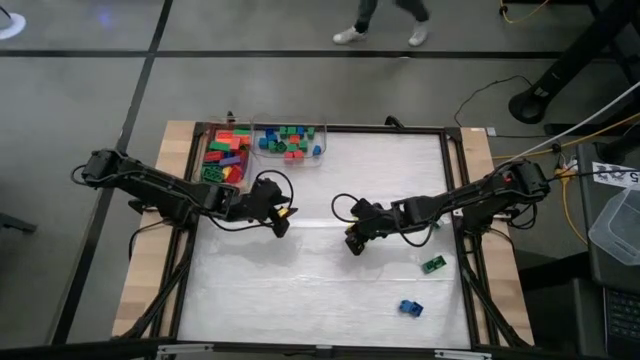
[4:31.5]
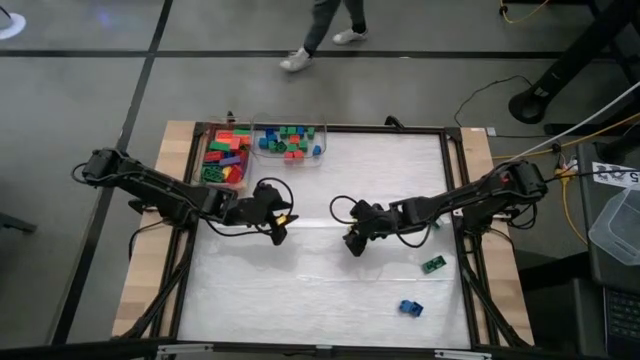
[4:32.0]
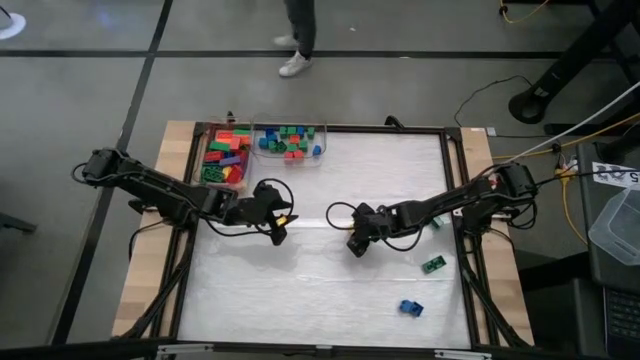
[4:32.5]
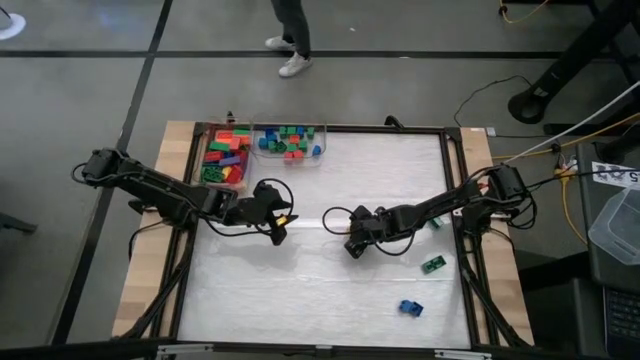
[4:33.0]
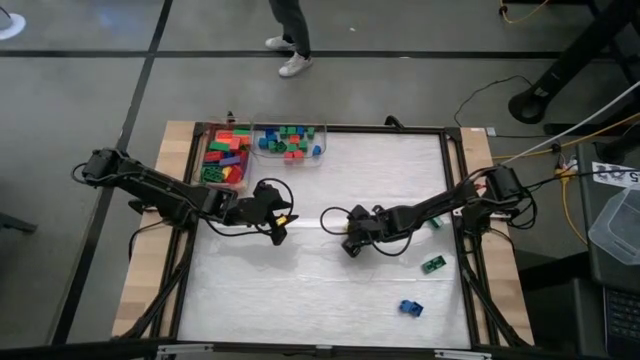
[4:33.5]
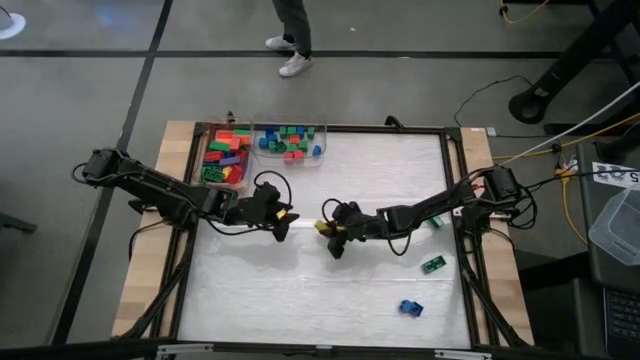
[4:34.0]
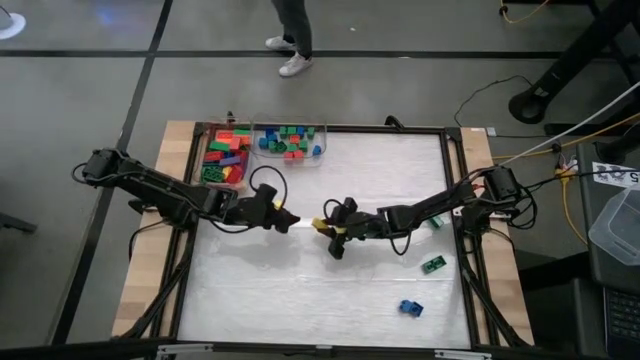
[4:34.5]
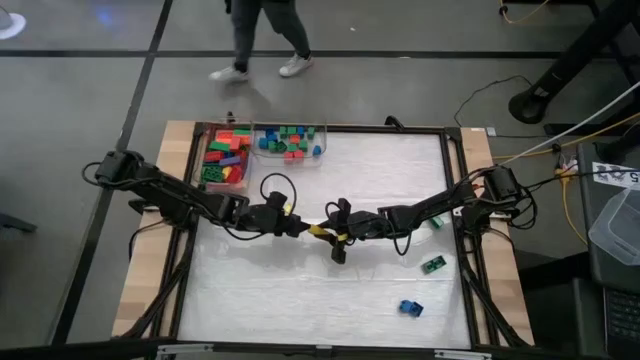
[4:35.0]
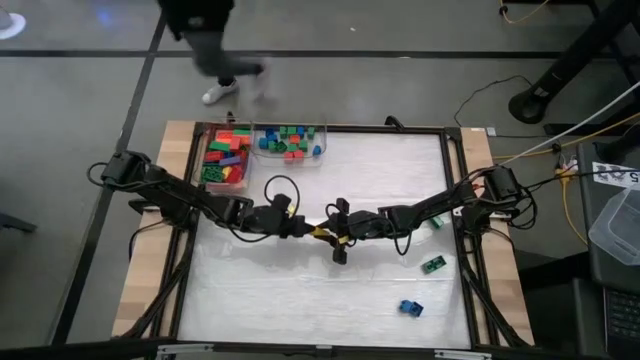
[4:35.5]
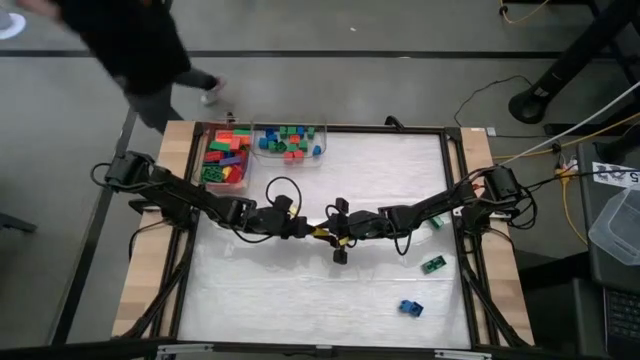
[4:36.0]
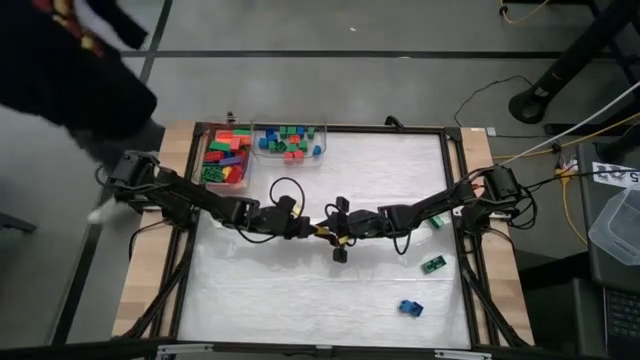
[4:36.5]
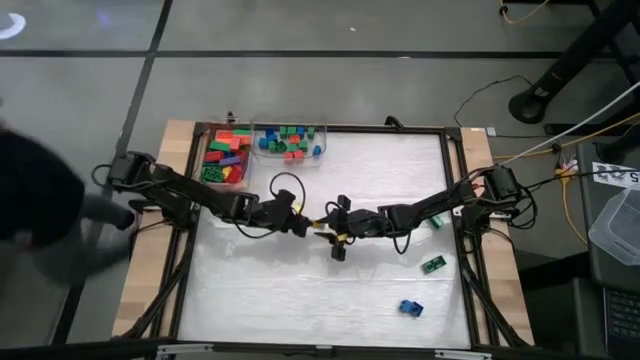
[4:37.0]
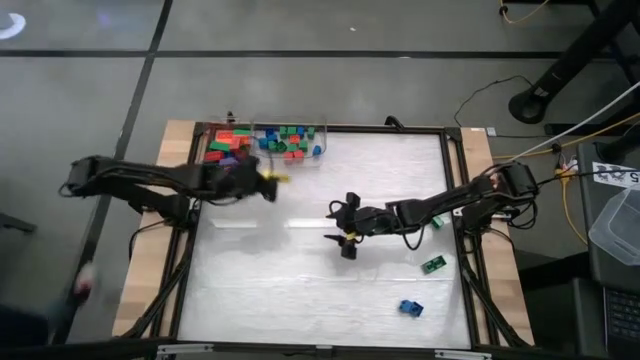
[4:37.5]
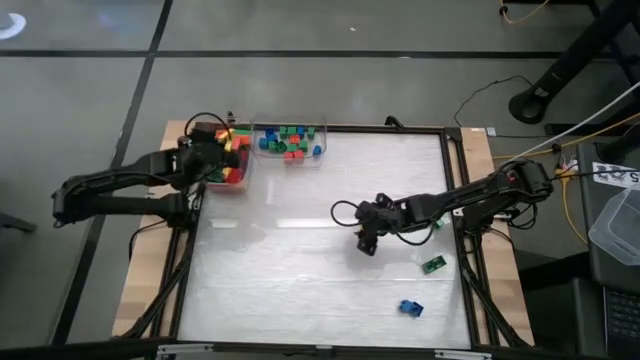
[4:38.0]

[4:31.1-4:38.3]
Task: Sort blocks by size
Put the large yellow block into the left transparent bin

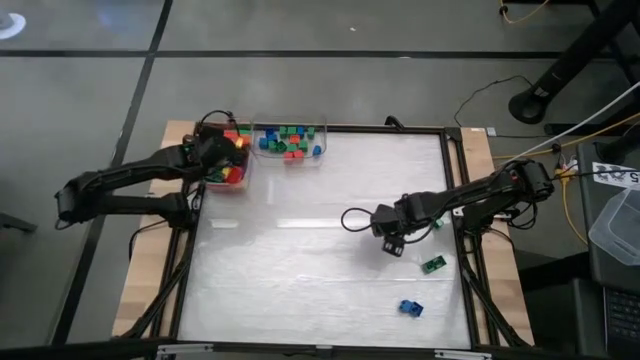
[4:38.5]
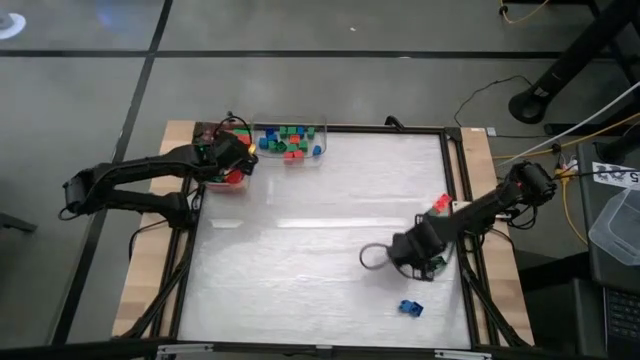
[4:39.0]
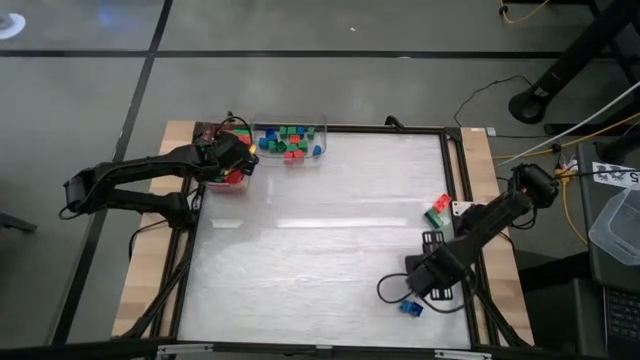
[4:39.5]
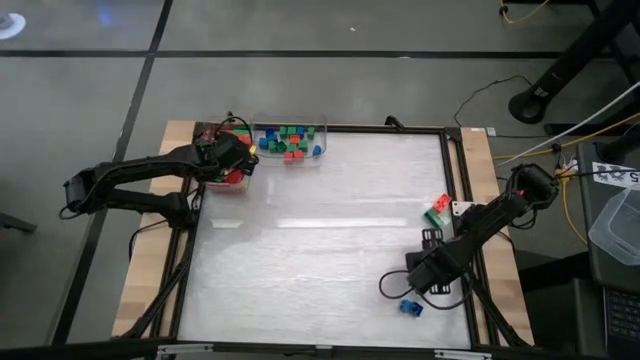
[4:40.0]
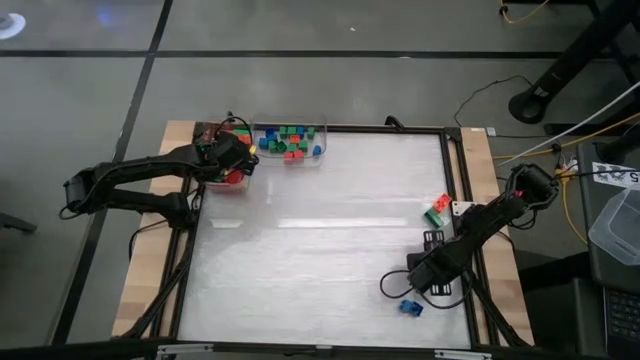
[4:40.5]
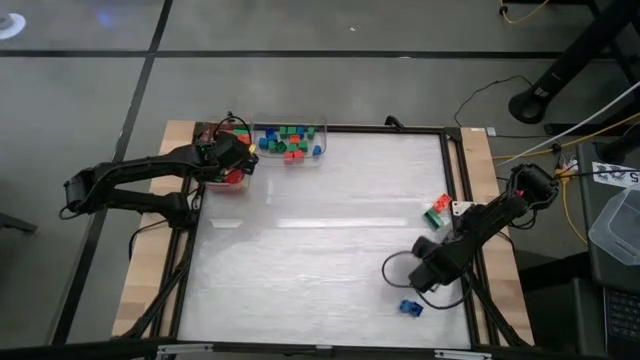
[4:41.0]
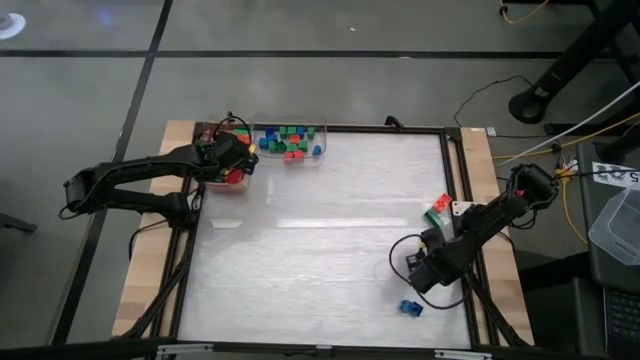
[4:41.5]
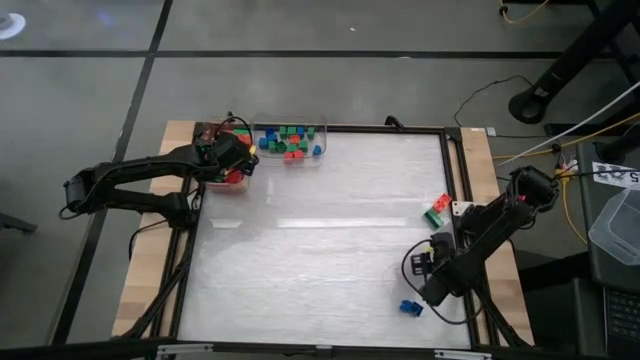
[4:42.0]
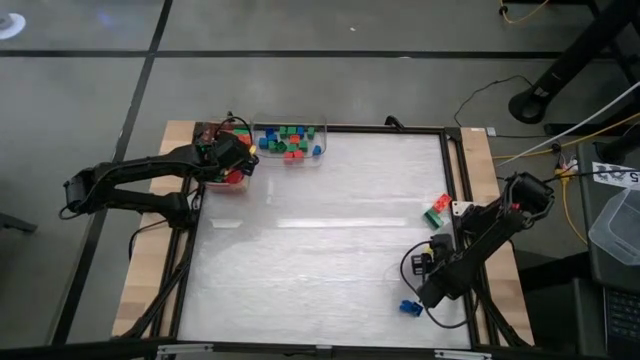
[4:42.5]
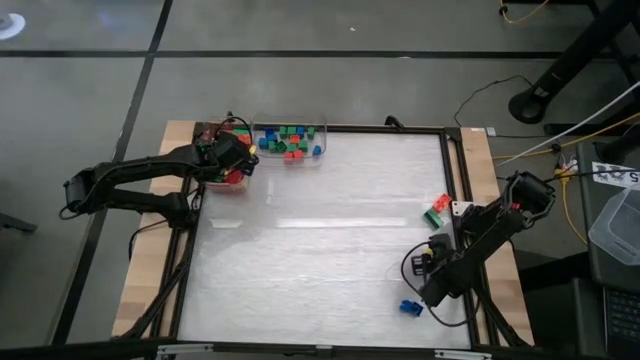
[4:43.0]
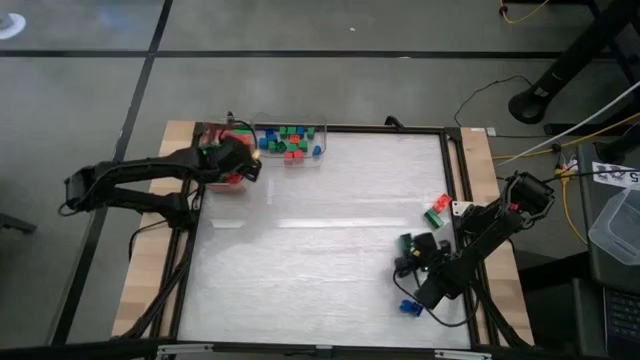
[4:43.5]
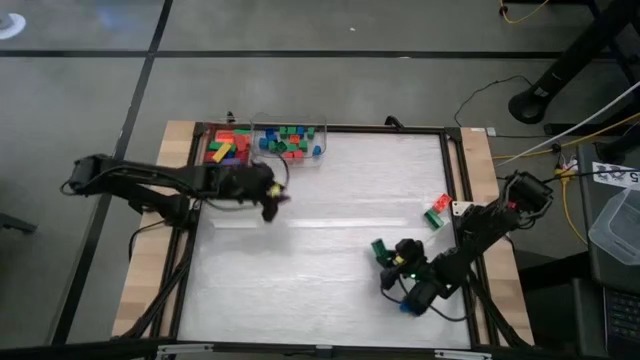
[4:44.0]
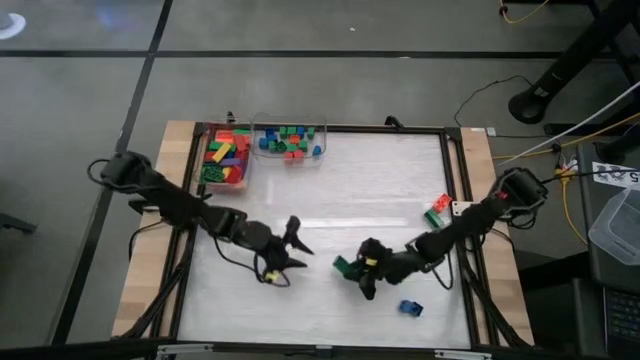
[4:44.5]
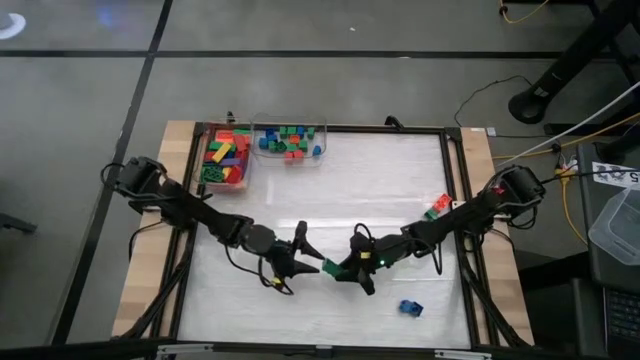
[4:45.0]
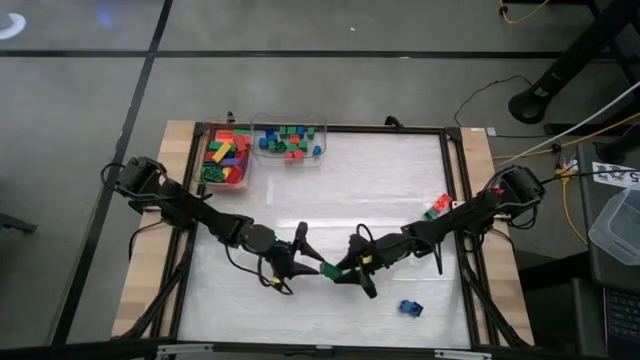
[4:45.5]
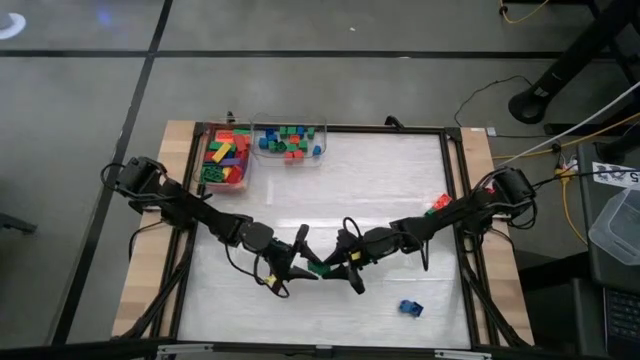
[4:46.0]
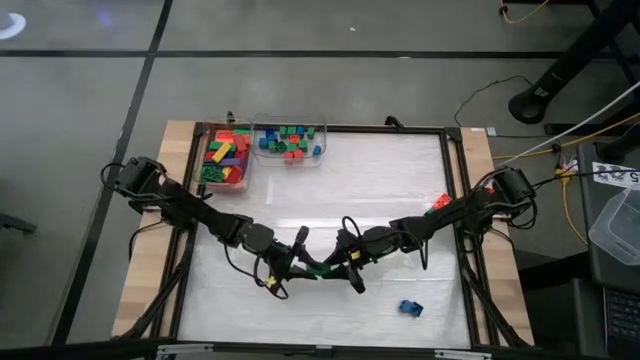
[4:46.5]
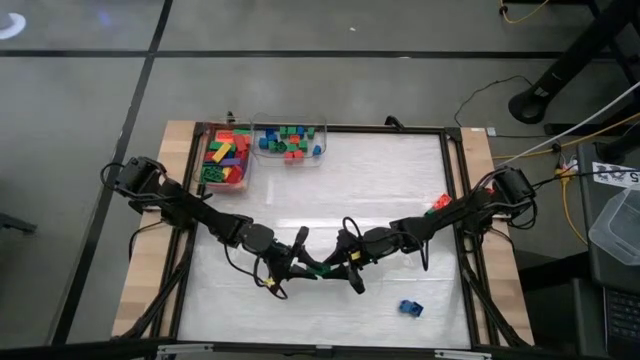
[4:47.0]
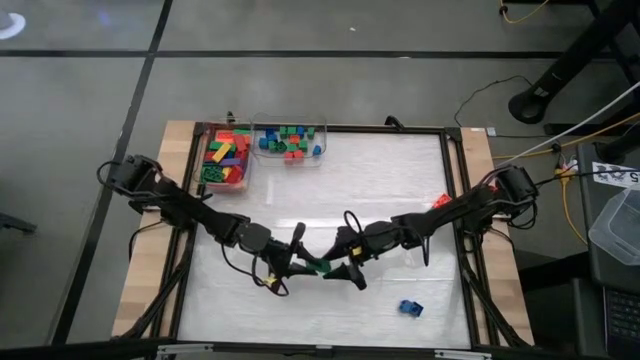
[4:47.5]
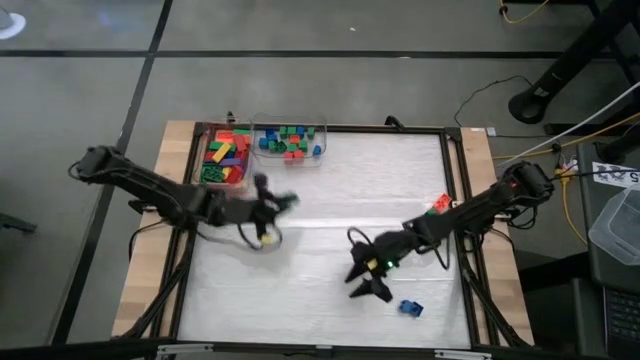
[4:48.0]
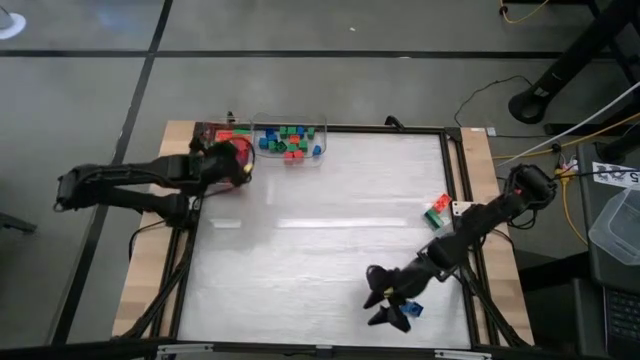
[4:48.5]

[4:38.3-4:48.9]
Put the large green game piece into the left transparent bin

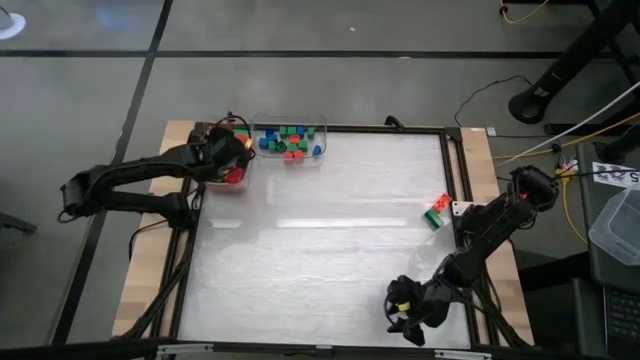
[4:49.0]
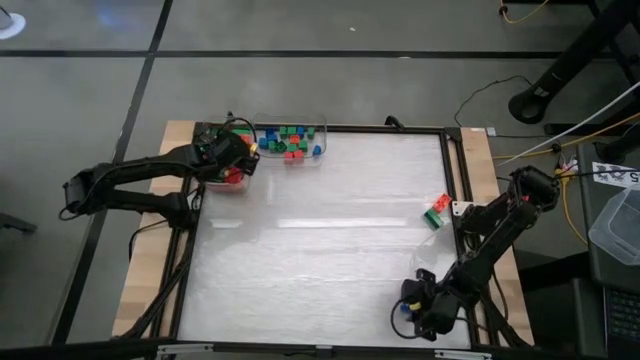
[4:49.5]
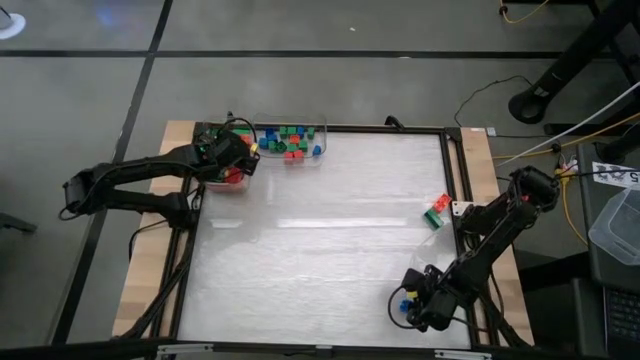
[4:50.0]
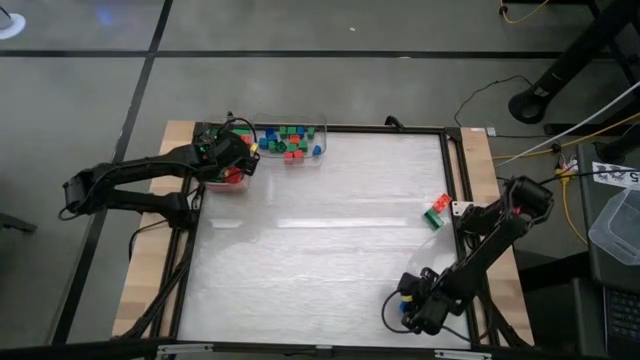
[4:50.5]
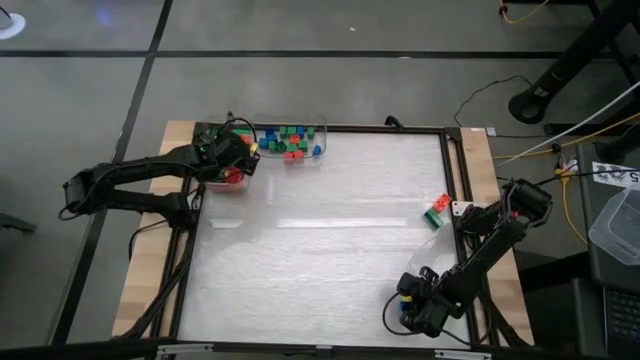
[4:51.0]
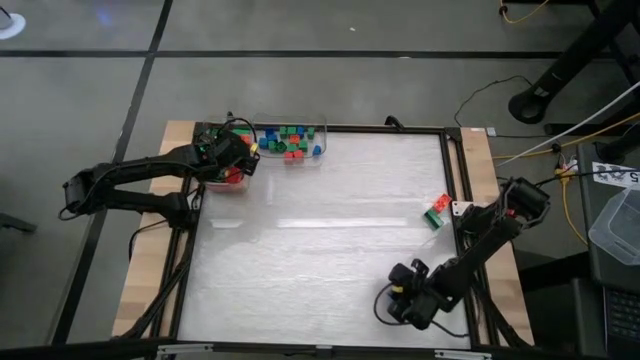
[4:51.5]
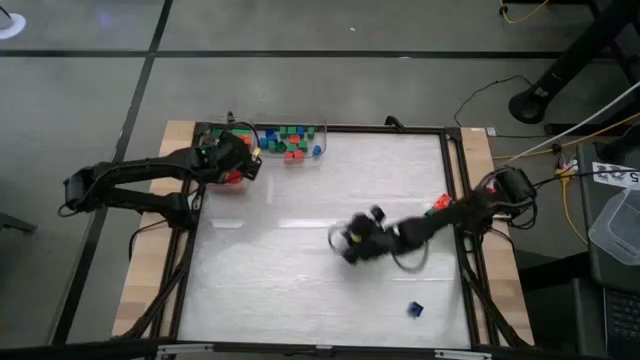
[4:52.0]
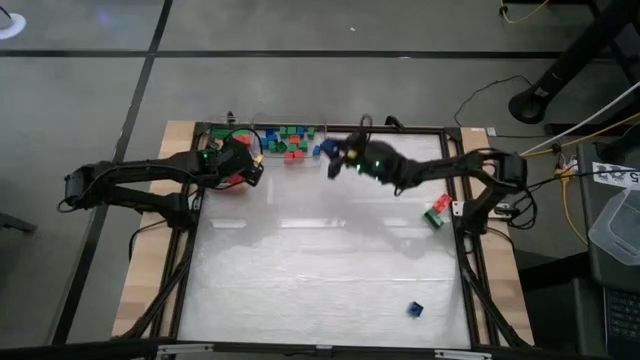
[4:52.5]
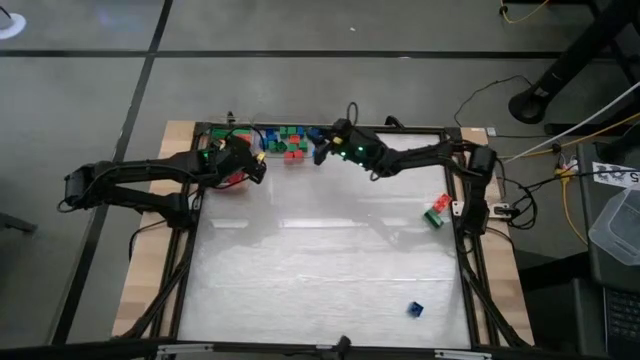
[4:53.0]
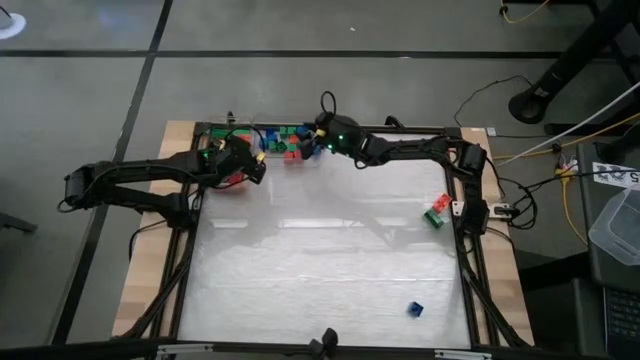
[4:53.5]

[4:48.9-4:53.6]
Put the small blue game piece into the right transparent bin
